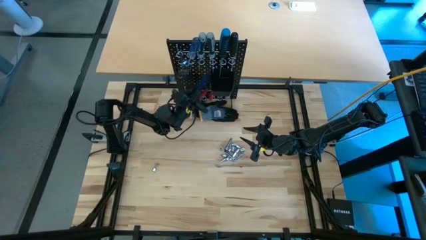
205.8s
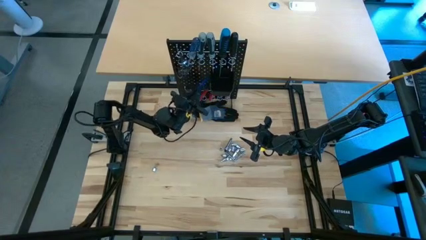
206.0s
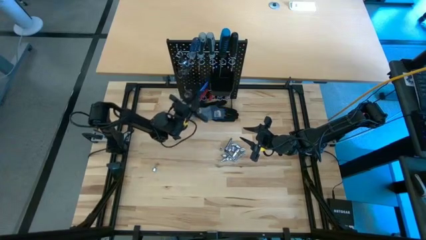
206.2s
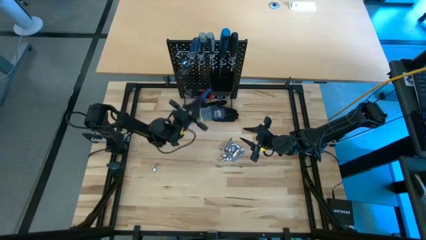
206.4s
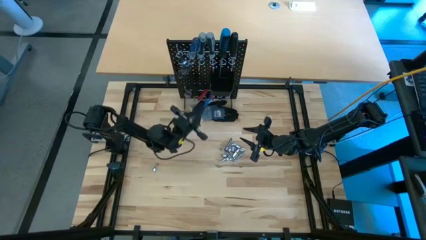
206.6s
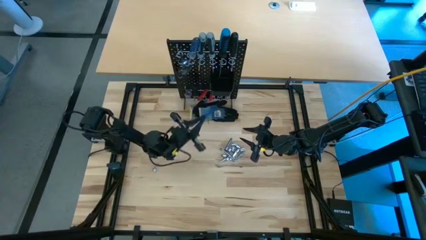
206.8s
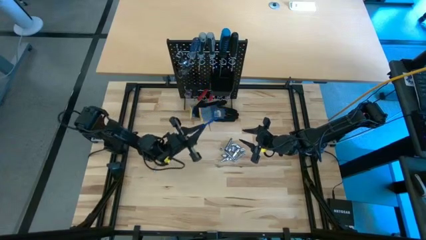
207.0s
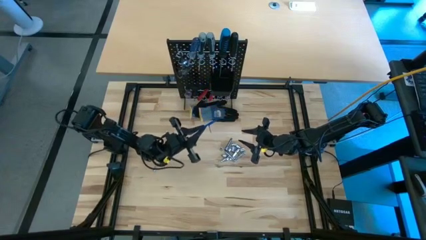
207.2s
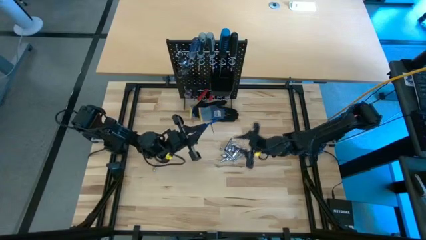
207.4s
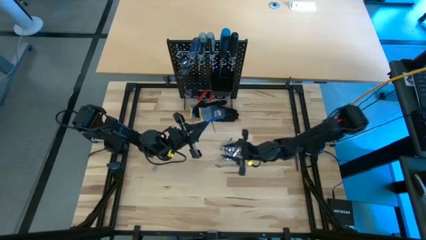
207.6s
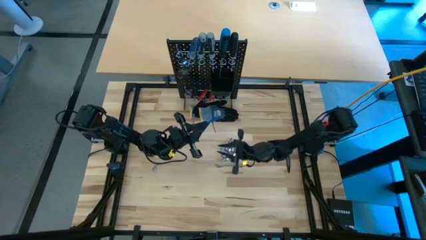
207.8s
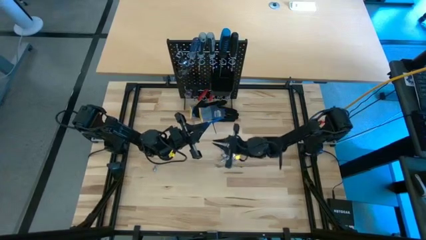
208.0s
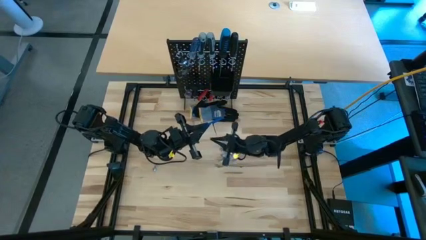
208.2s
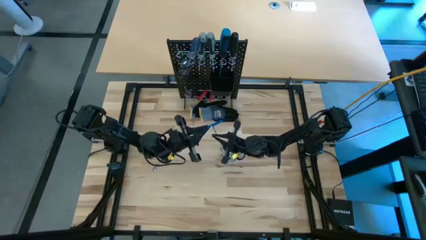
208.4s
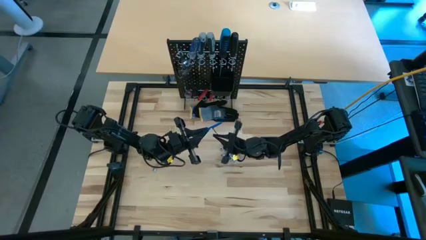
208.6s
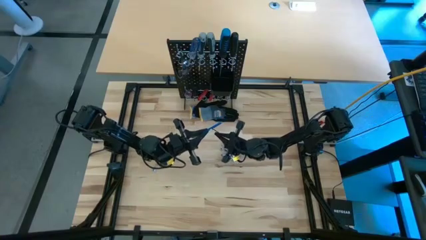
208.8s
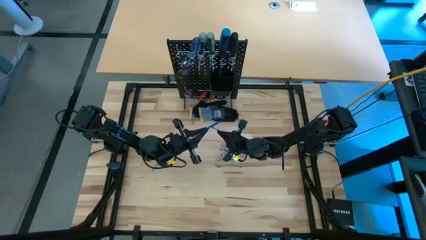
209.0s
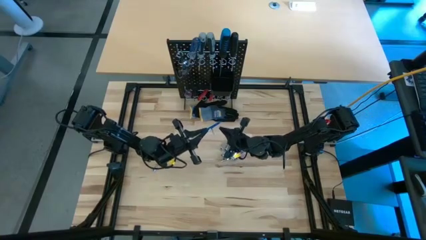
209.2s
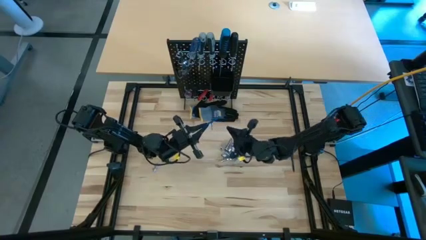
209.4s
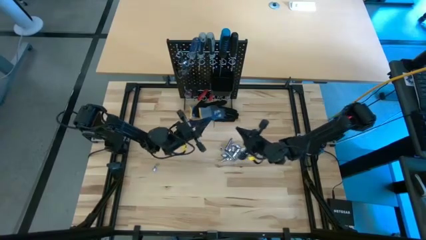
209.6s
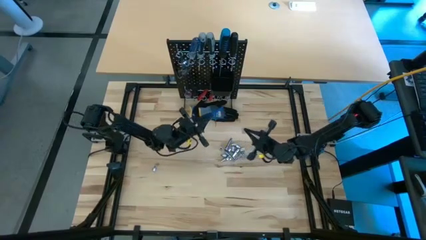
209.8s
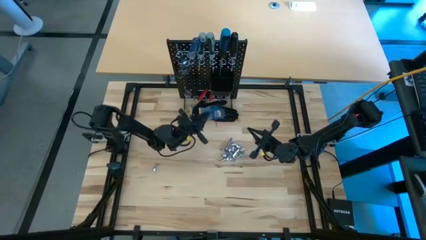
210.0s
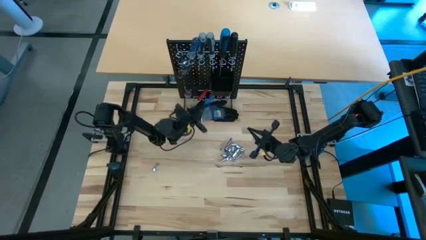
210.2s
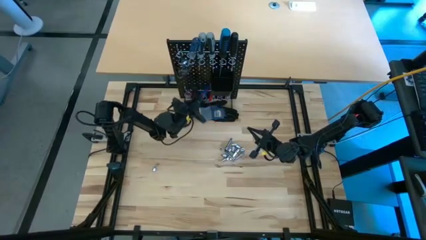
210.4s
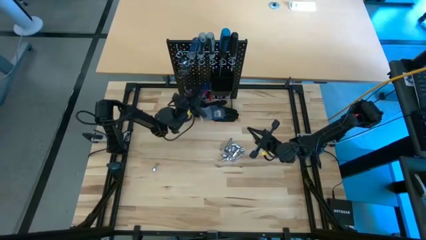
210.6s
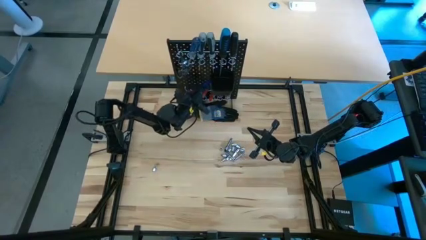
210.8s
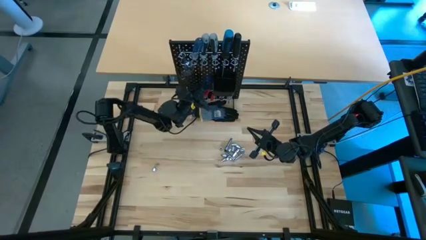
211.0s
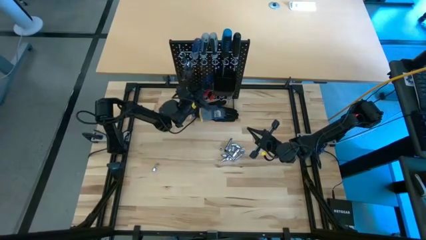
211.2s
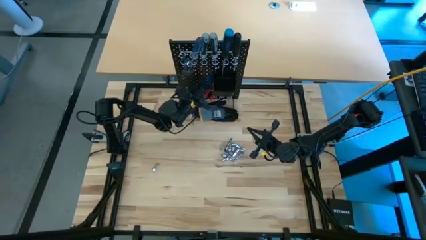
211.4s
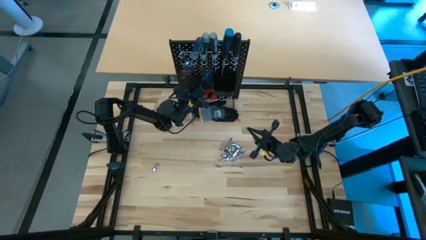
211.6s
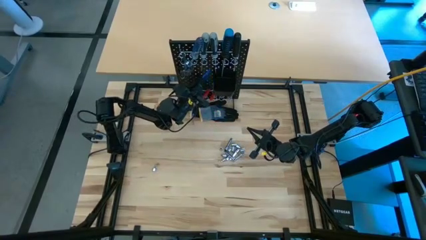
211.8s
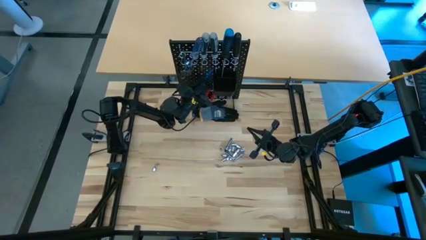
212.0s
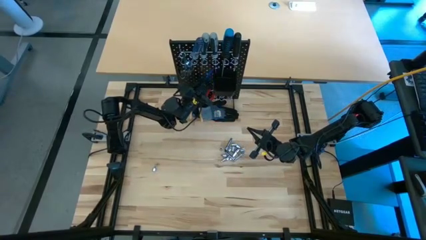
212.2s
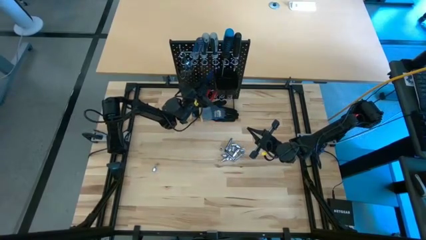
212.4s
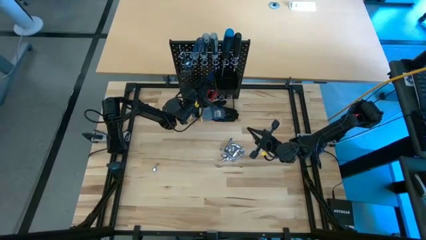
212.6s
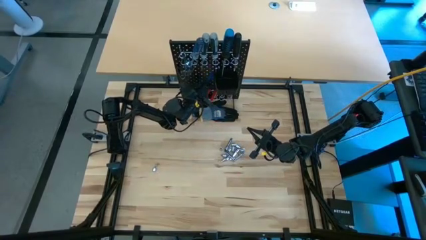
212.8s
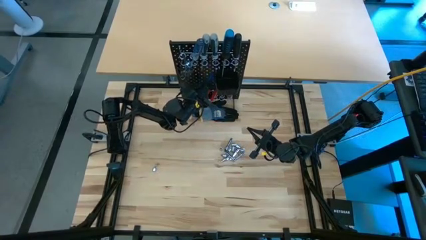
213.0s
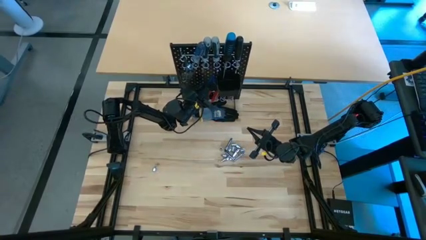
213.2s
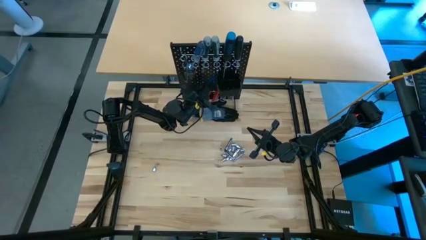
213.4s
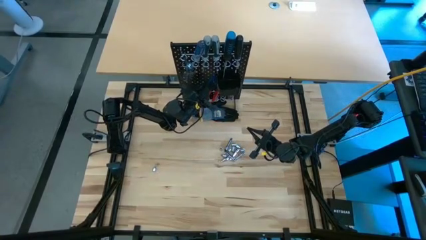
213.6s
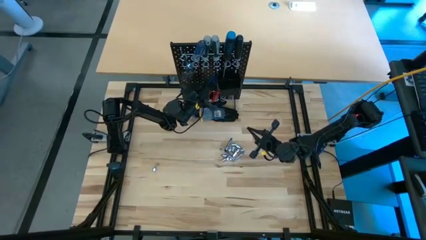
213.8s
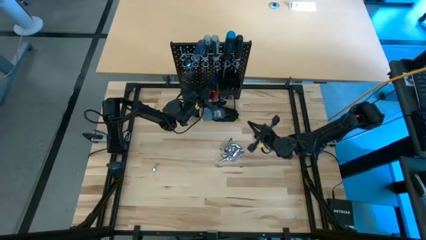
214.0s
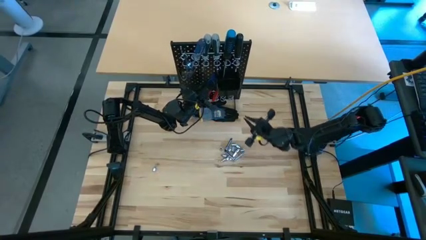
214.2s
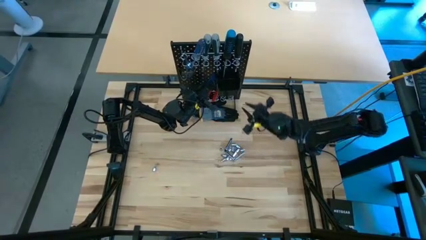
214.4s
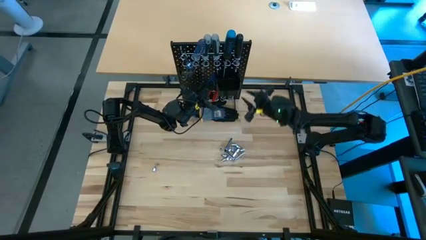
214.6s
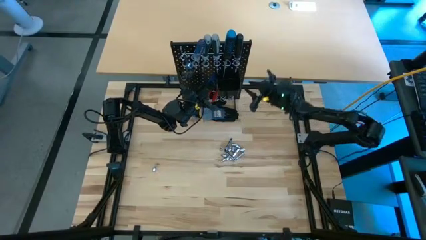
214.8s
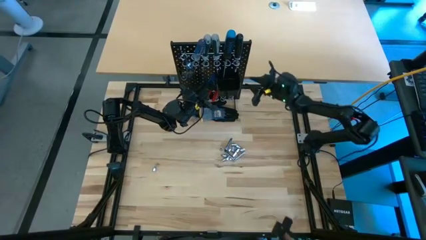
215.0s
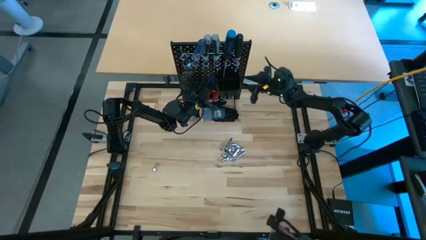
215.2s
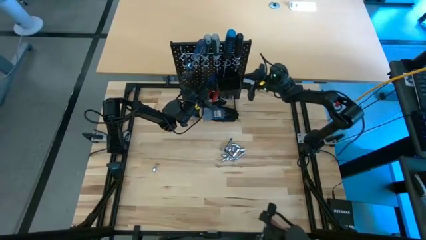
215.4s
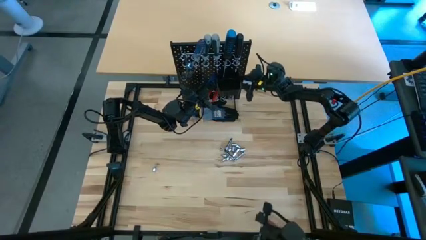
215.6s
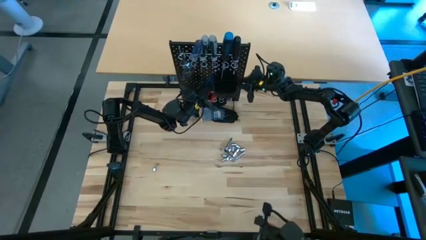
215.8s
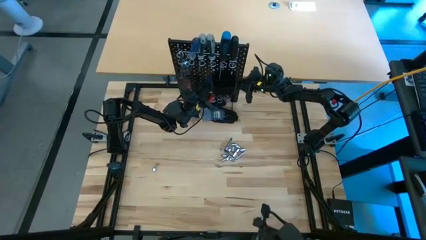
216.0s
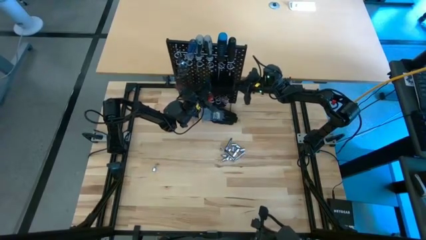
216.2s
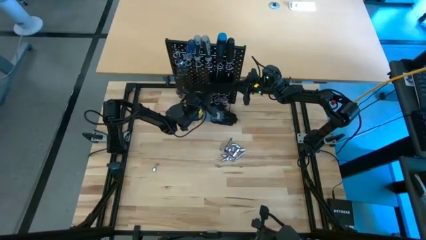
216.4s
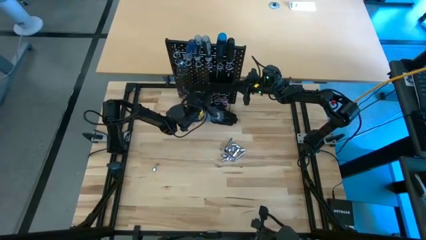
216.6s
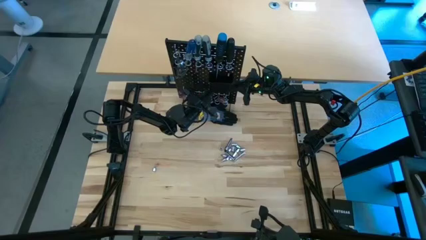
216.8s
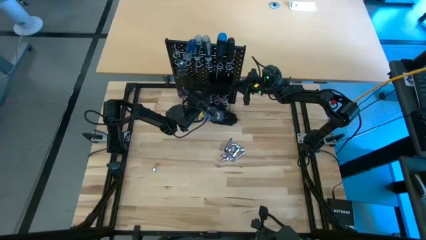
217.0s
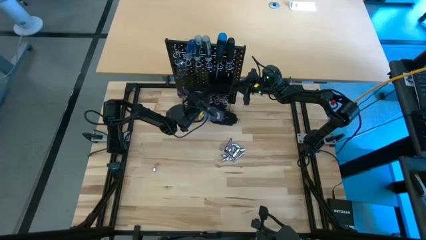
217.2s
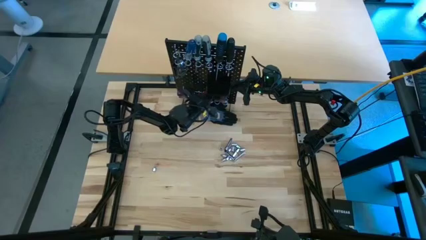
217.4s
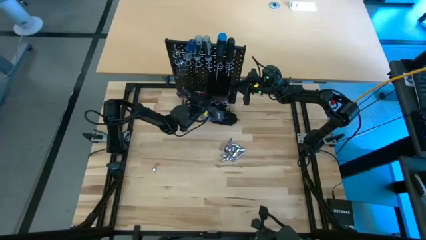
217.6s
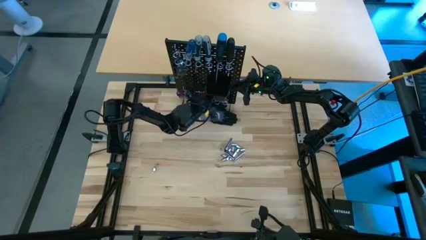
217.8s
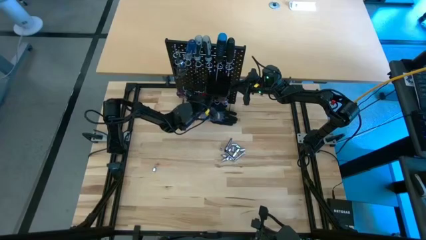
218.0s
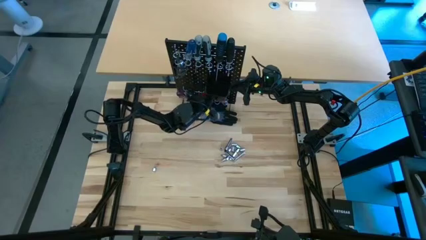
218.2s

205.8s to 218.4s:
Task: Hang tools onto peg board
Hang the blue pick tool on the pegboard

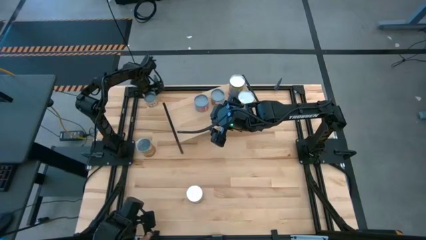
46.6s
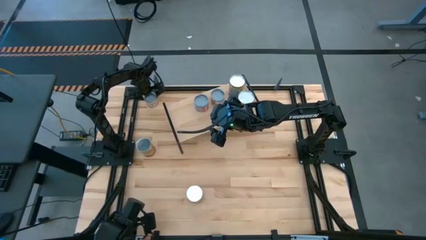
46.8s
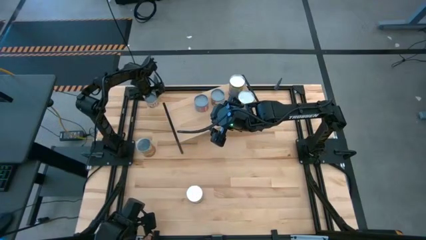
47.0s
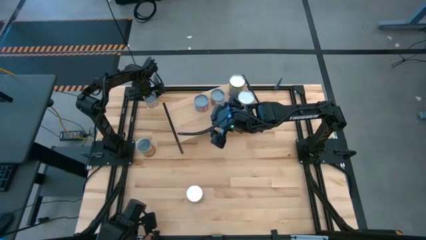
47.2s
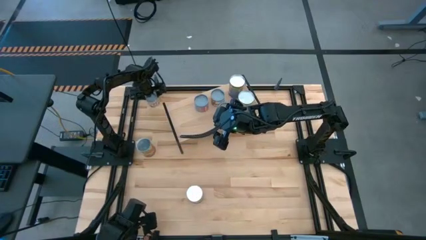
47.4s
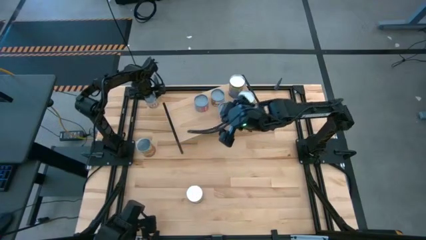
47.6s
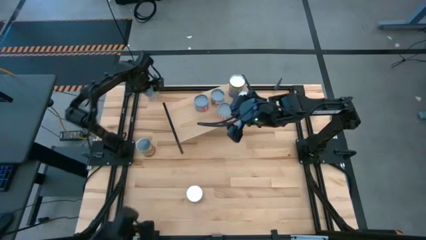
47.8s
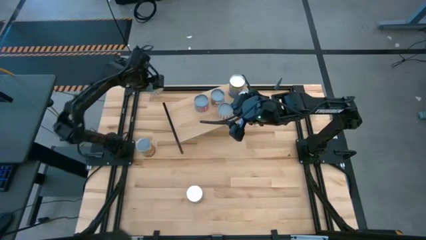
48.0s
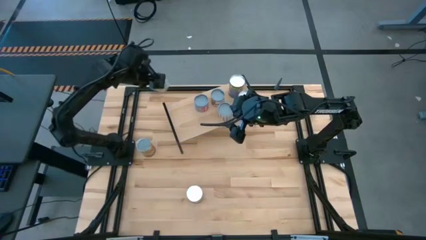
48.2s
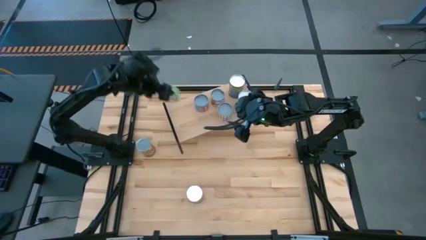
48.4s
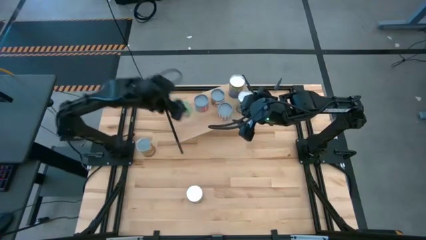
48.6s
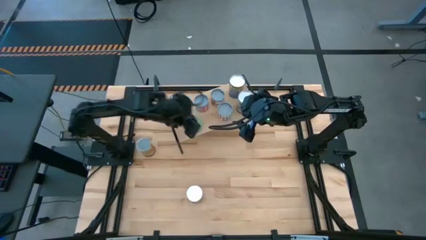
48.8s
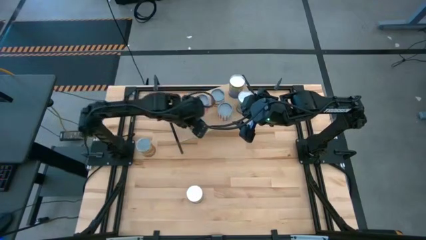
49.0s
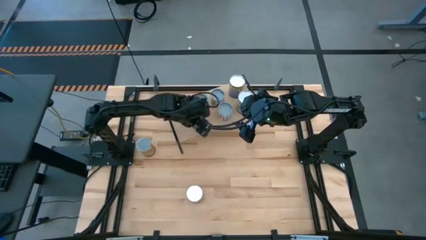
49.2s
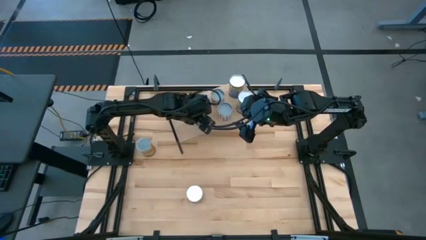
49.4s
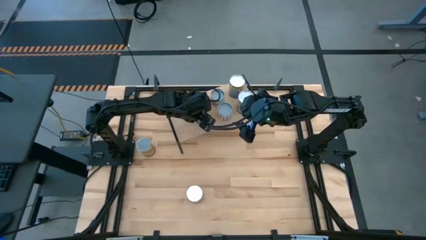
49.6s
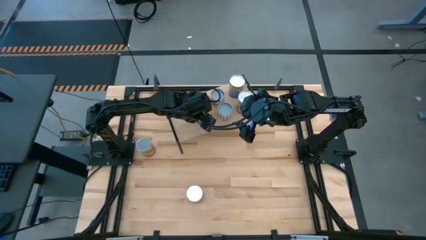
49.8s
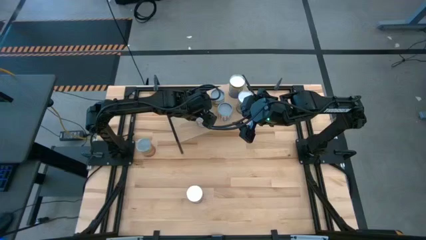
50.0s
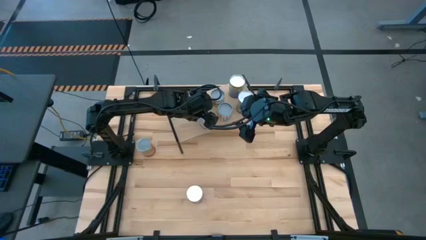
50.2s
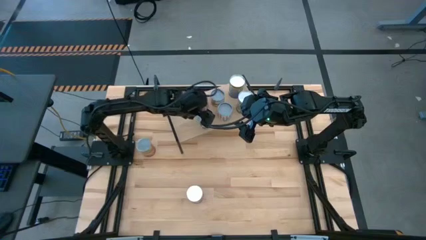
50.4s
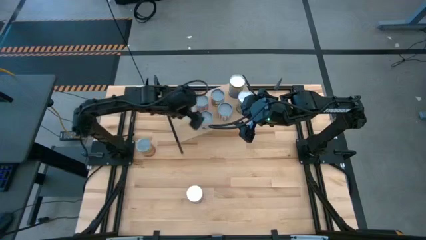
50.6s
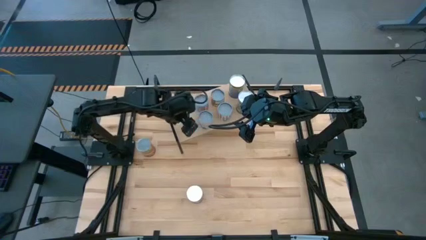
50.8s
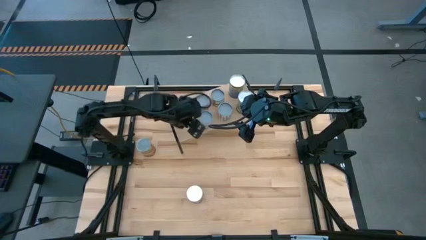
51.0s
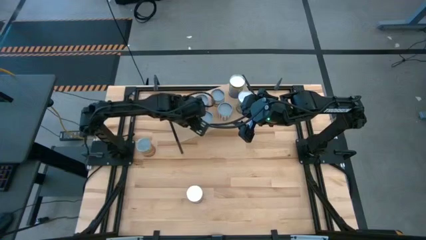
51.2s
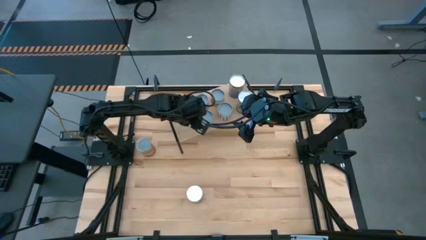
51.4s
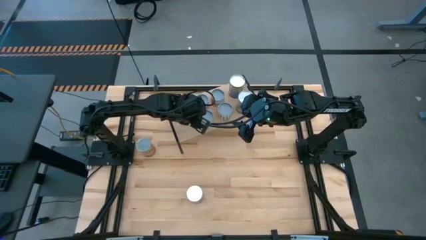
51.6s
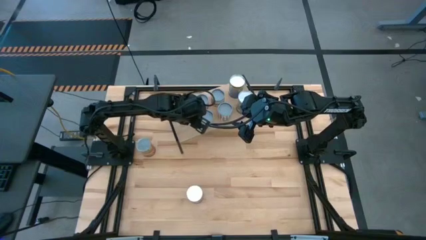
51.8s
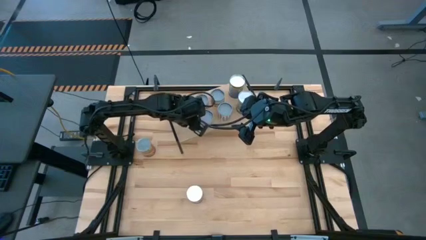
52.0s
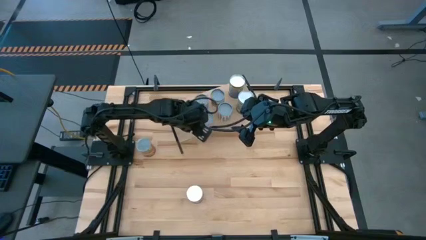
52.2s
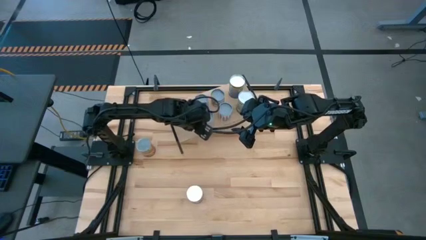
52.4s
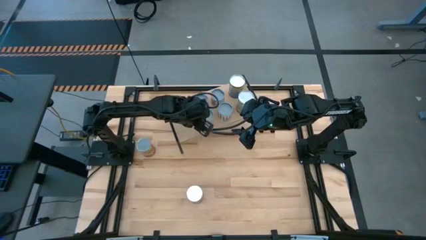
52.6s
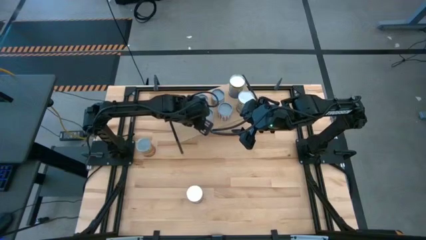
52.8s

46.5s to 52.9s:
Task: Pick and place cans onto a shelf
Put the canned green peas on the shelf
